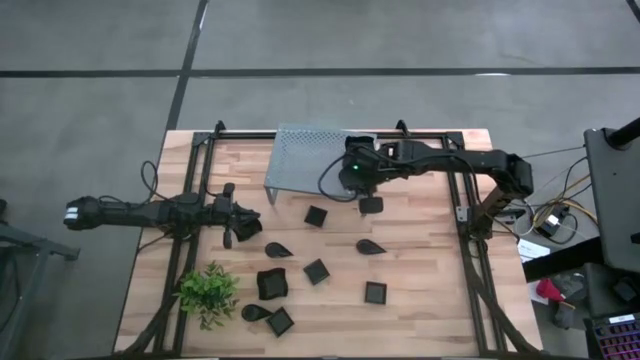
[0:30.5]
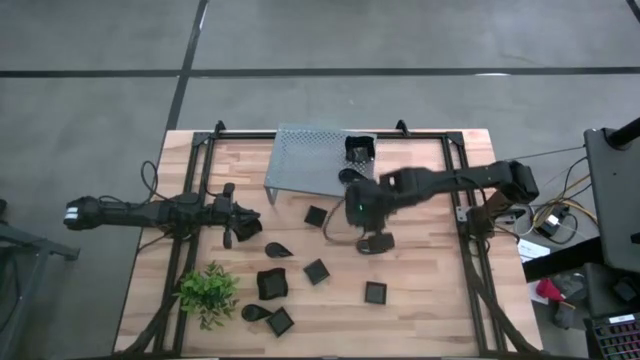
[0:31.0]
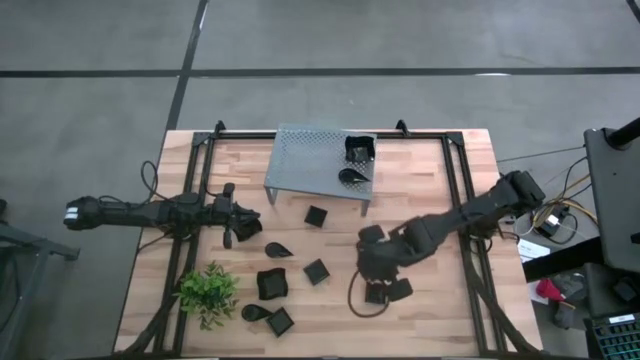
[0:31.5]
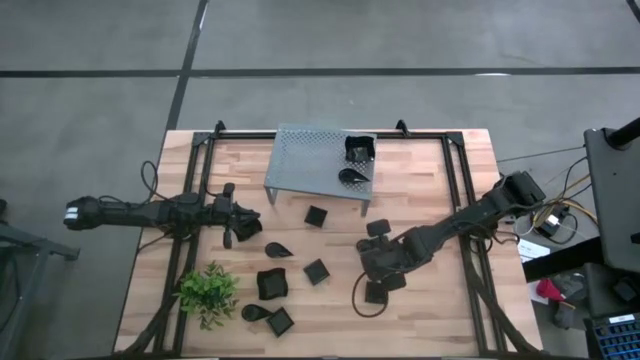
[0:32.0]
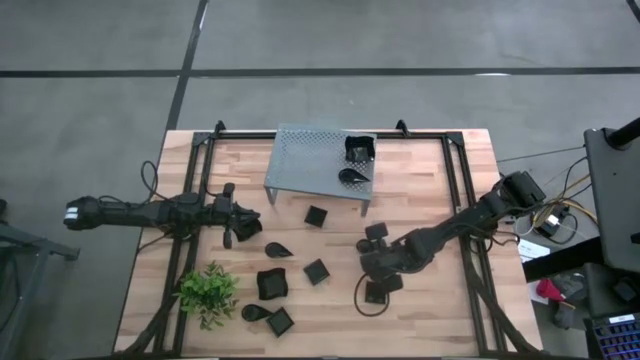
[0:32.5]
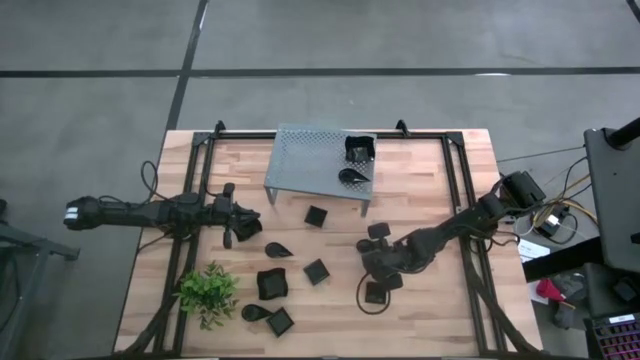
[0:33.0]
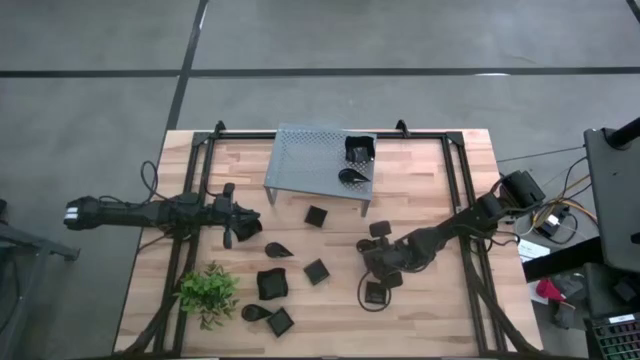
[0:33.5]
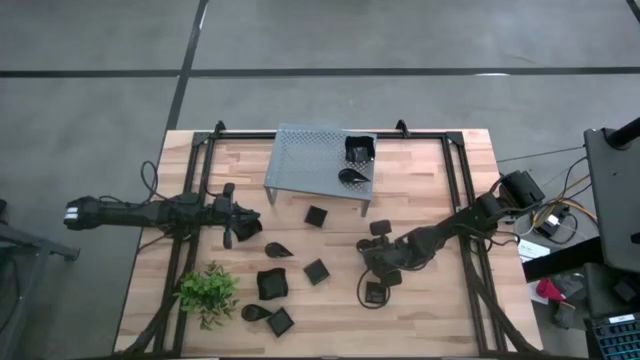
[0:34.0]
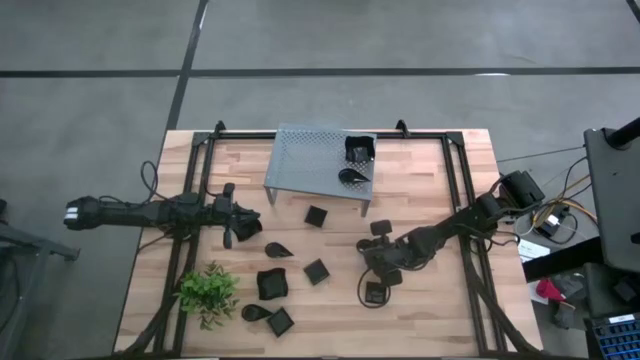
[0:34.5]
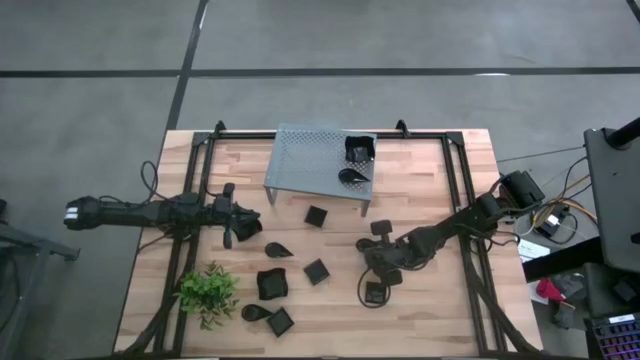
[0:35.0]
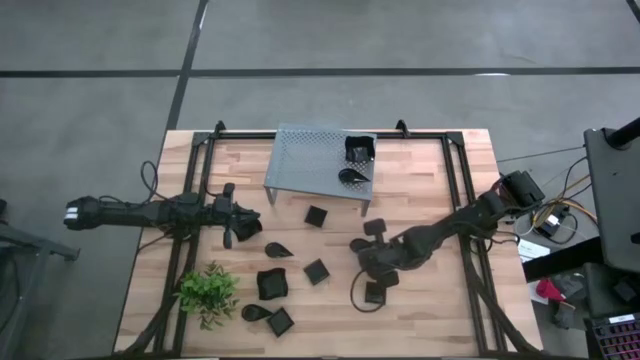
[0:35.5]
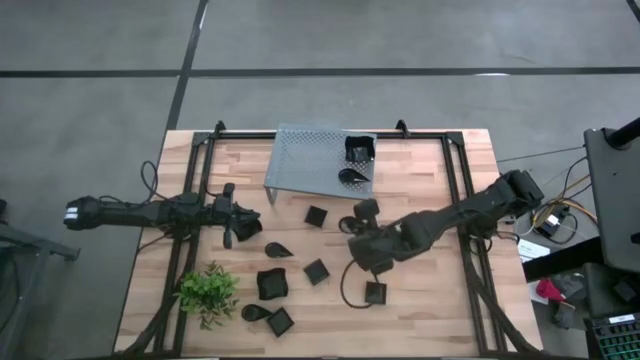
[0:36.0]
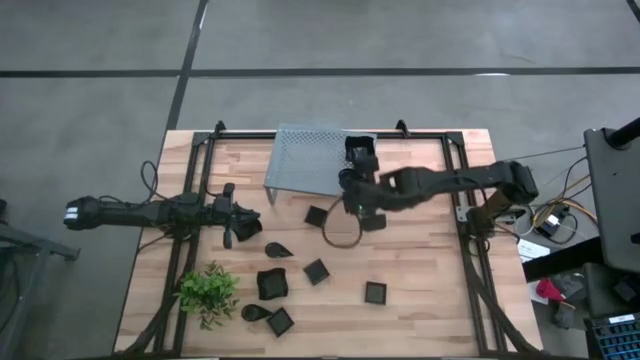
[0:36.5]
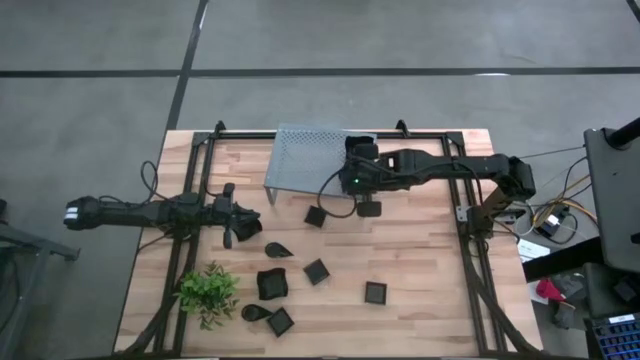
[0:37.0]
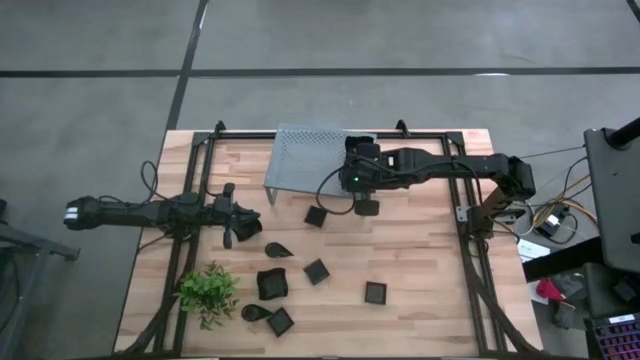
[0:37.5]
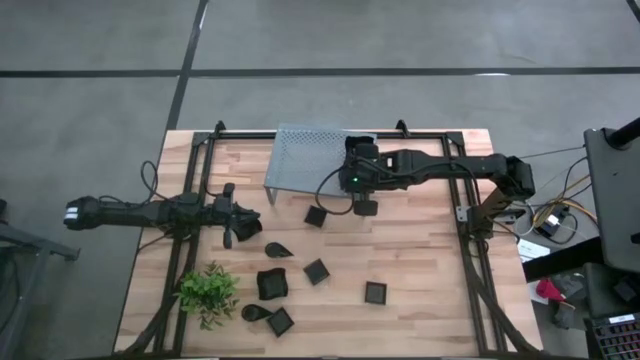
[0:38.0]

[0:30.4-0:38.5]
Task: Pick & Place Mini shaped plates
Stack the black drop shaped plate on top of the other black drop shaped plate on the shelf

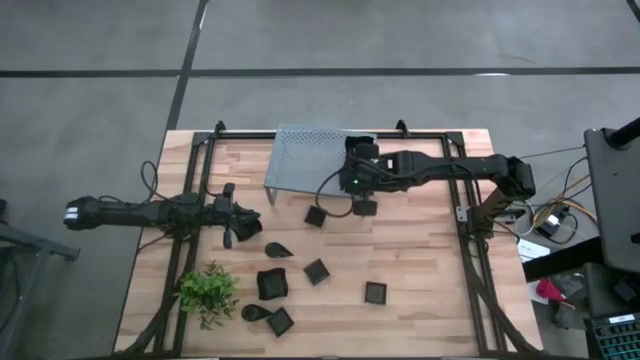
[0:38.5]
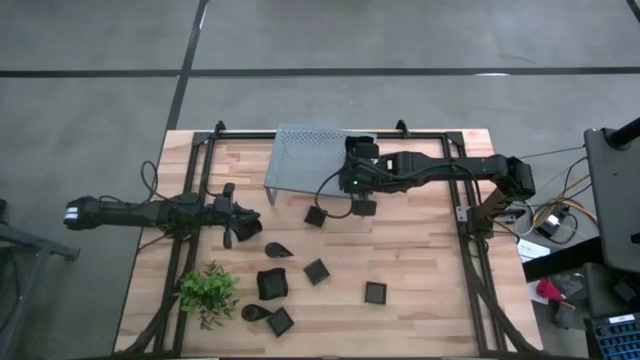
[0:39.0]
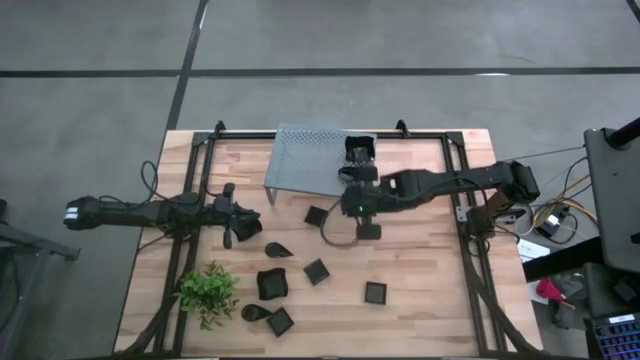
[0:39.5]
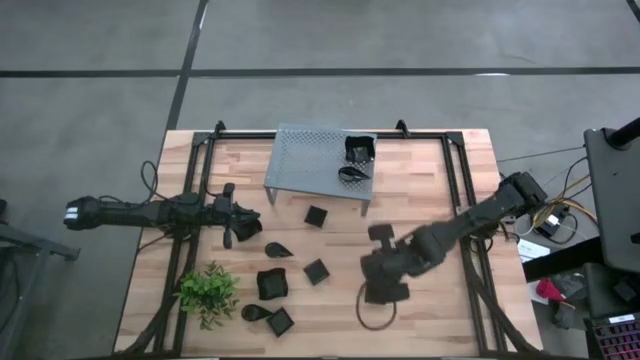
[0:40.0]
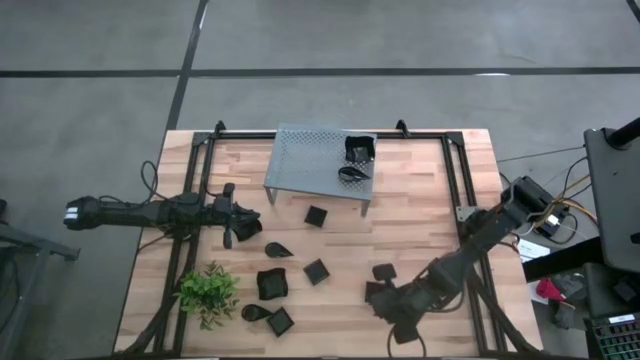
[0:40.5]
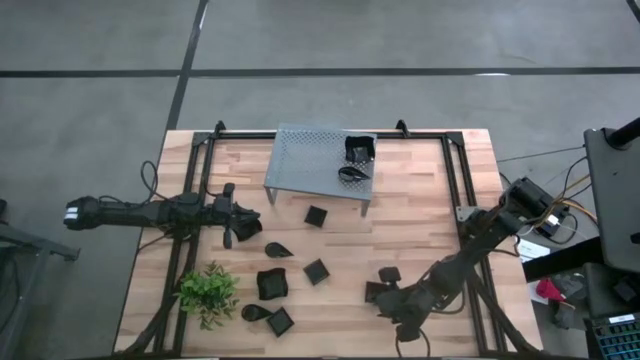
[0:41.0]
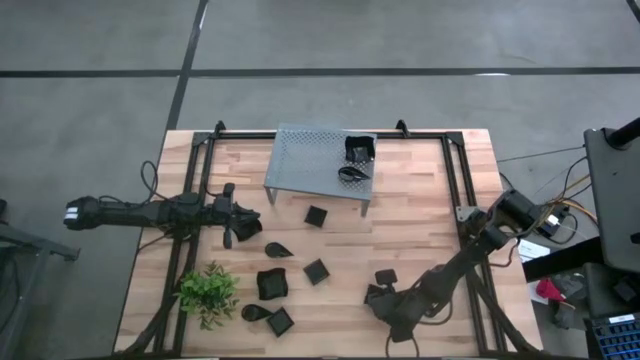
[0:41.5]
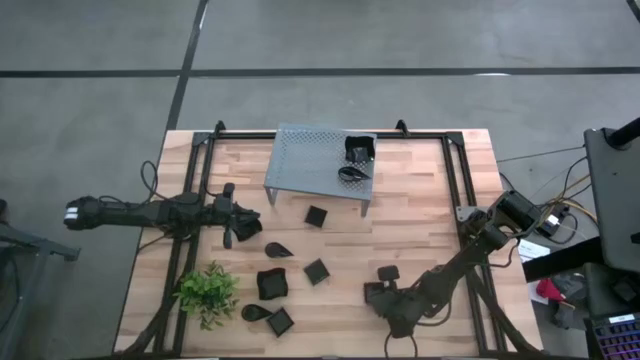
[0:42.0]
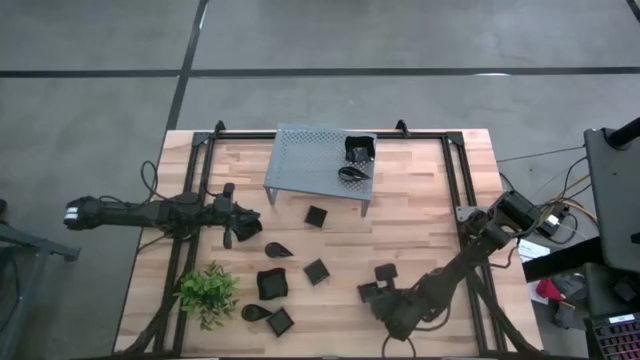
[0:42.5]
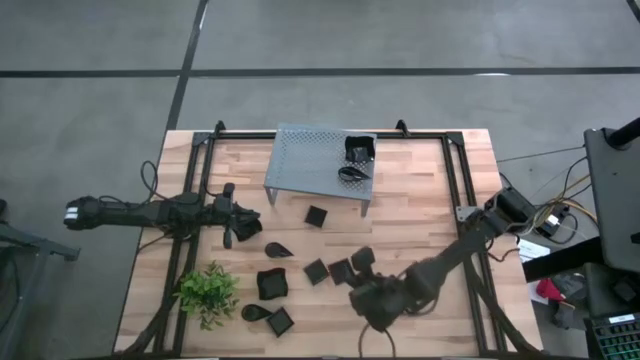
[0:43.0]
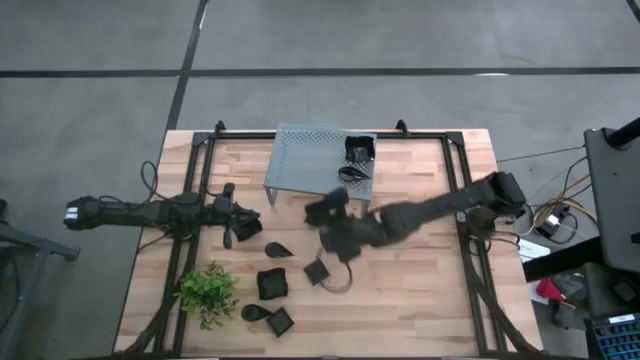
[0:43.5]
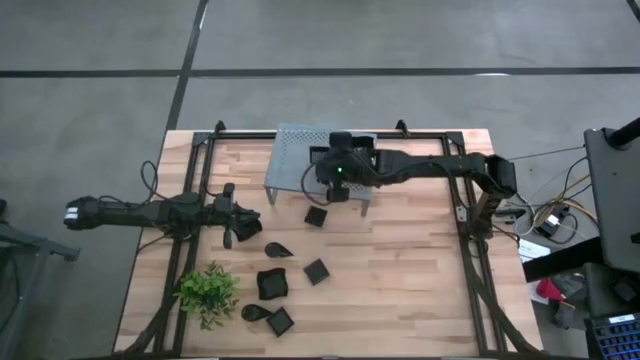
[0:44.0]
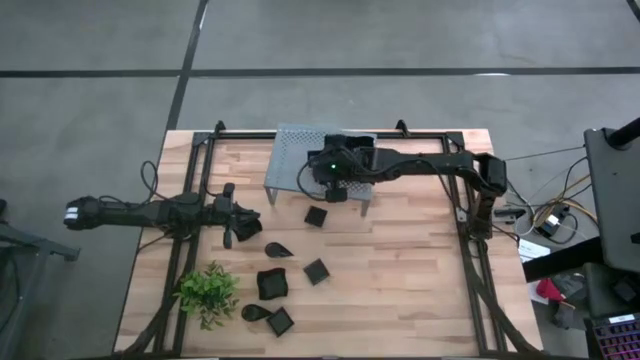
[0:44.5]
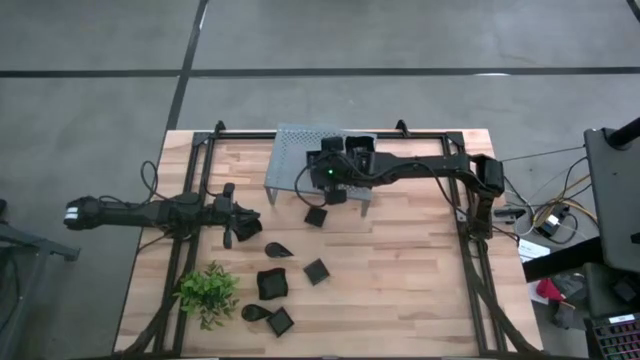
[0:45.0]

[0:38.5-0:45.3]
Put the black square plate on the shelf

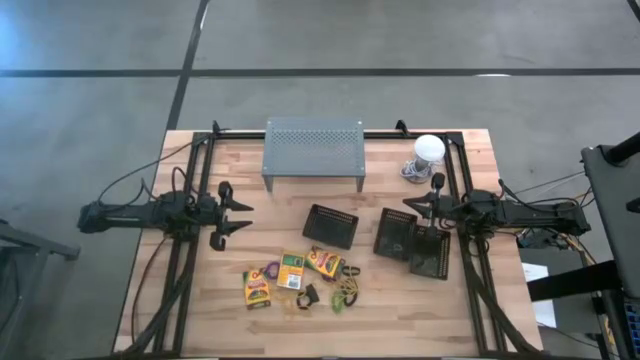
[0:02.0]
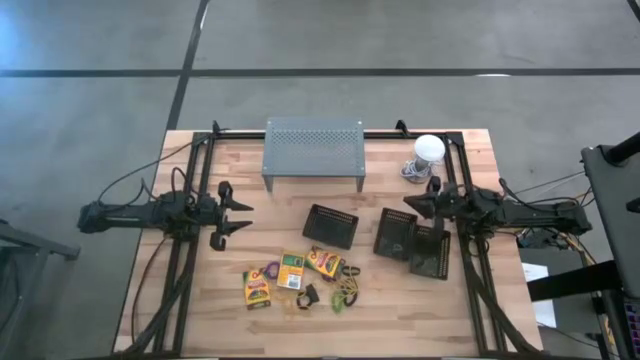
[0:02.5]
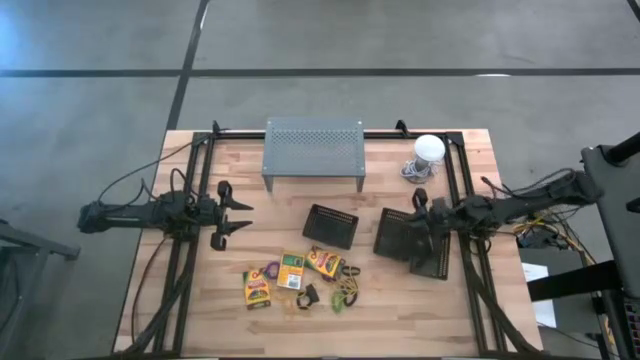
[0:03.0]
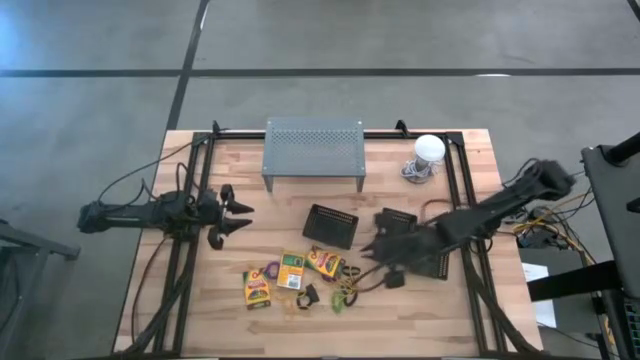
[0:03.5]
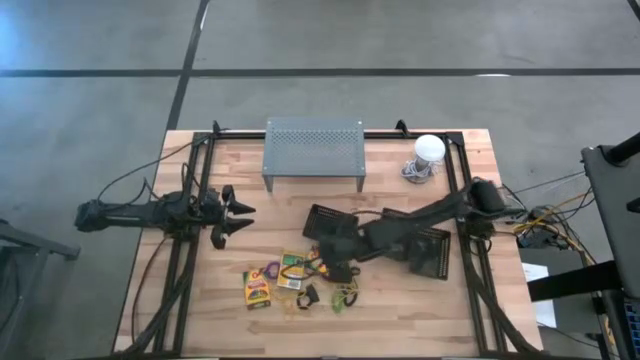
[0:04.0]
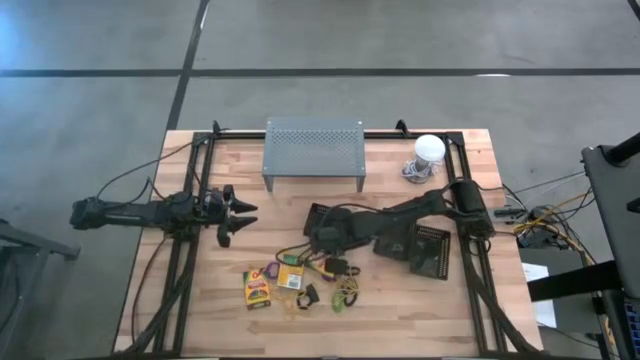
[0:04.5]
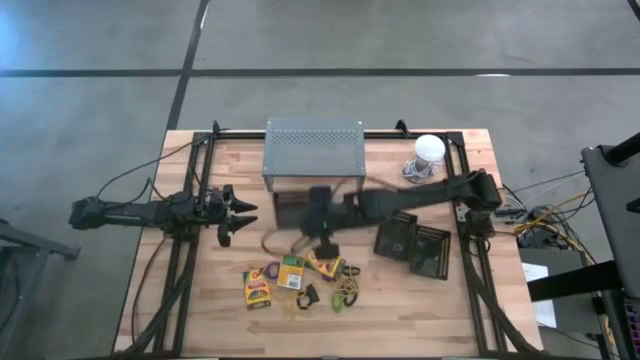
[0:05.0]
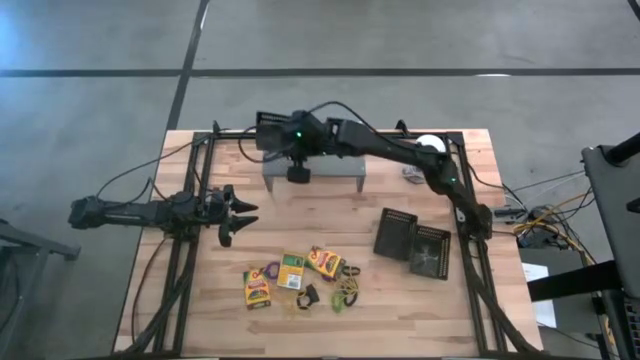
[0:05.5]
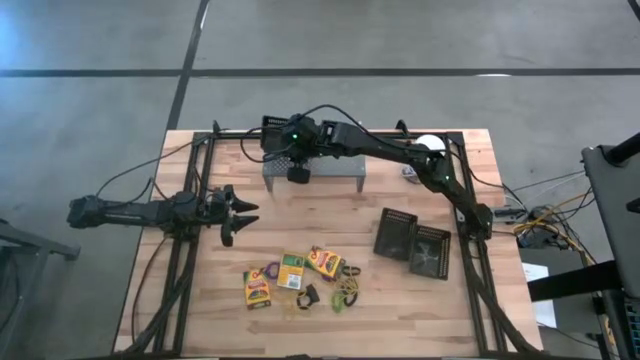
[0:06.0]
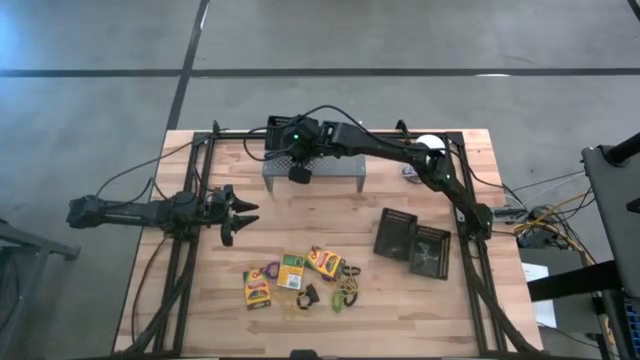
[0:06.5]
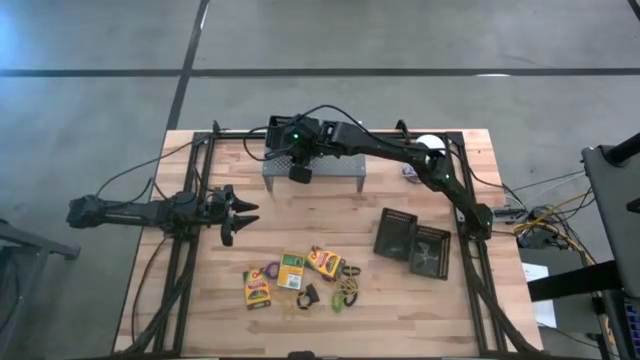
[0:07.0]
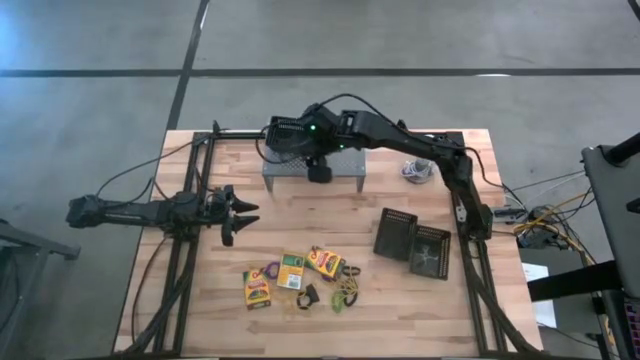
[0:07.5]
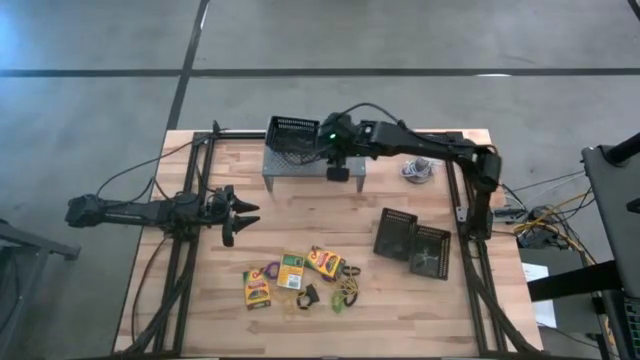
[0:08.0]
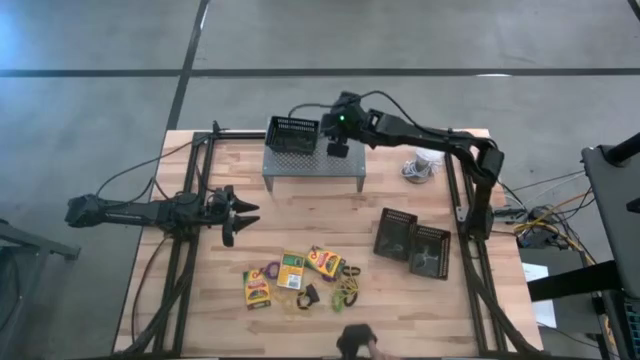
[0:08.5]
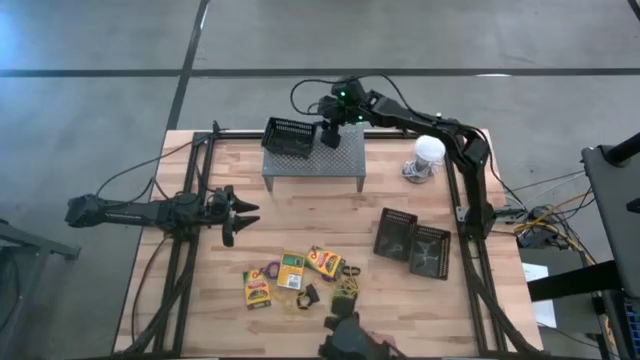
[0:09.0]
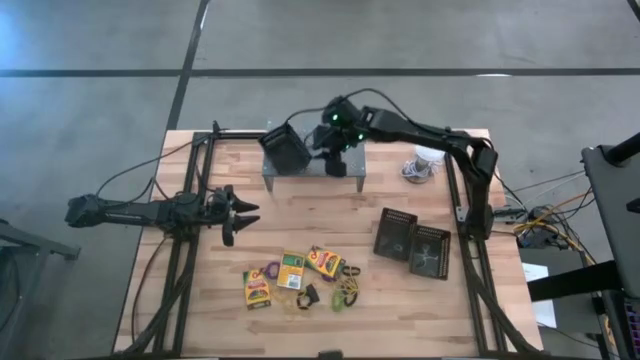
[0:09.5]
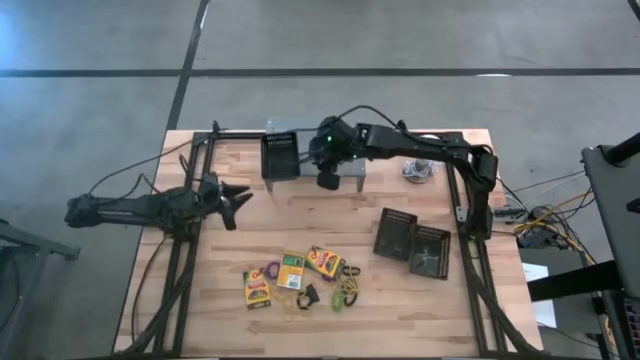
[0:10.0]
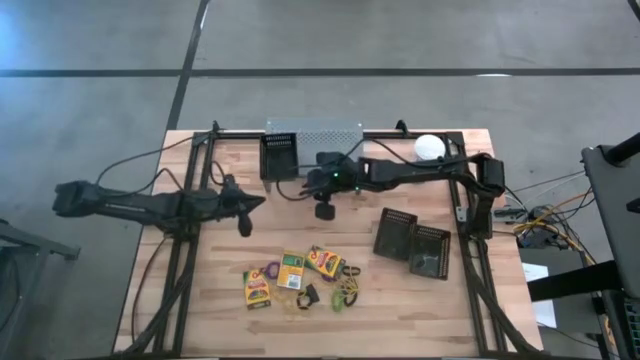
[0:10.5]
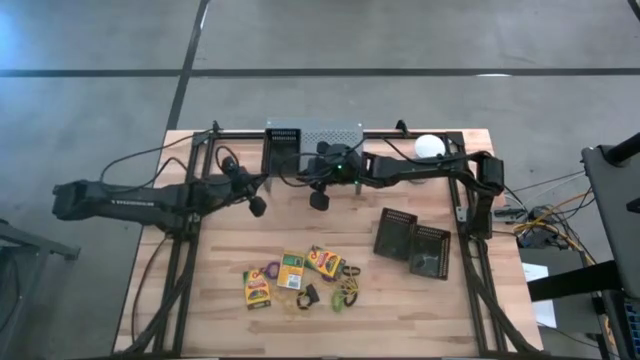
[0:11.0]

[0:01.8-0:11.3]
Task: Pick & Place Office Desk Supplies
Put the left black basket
